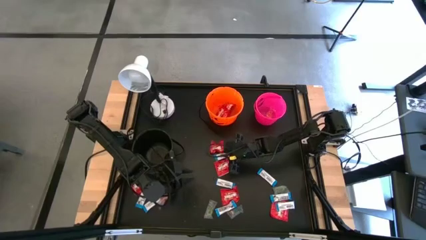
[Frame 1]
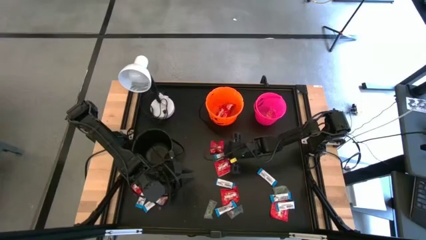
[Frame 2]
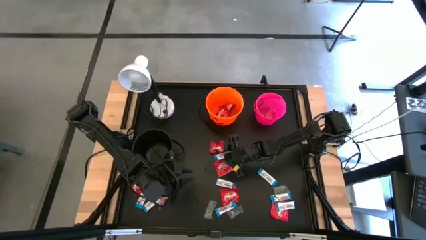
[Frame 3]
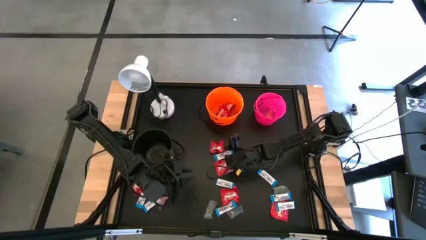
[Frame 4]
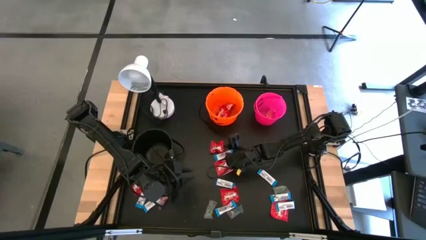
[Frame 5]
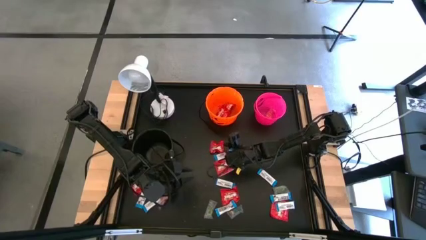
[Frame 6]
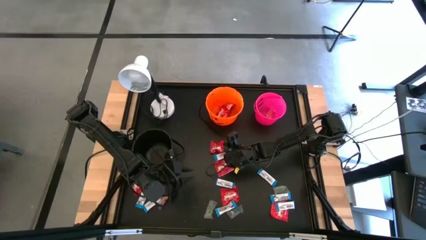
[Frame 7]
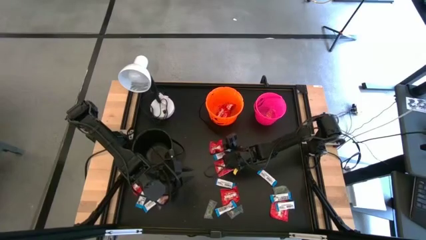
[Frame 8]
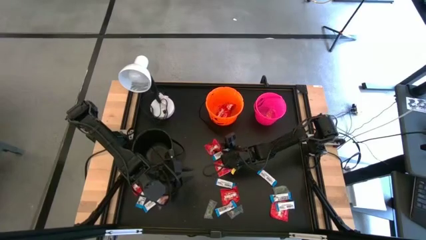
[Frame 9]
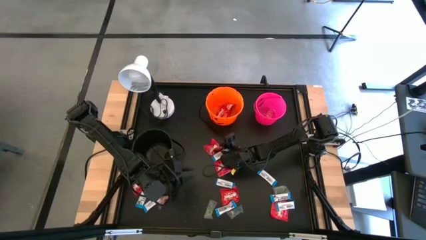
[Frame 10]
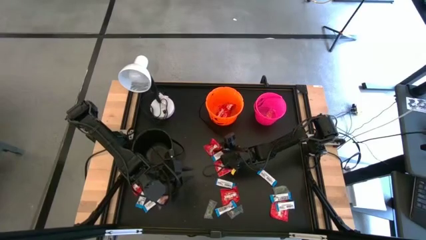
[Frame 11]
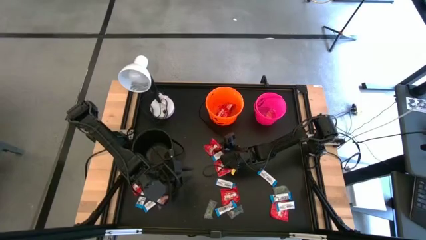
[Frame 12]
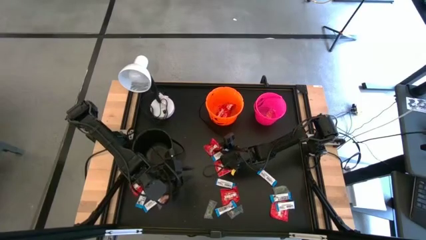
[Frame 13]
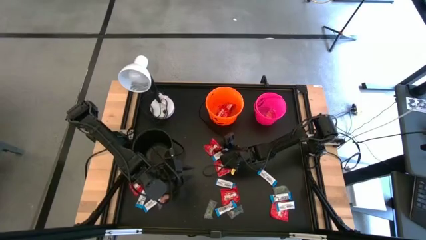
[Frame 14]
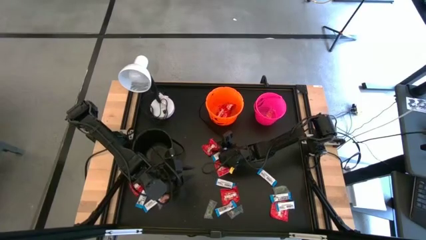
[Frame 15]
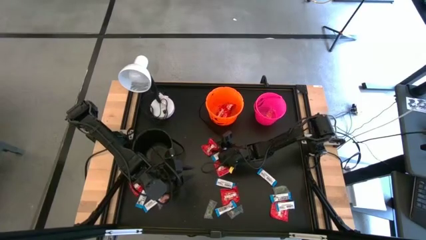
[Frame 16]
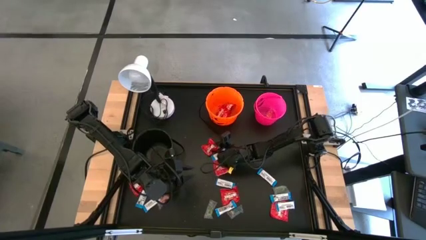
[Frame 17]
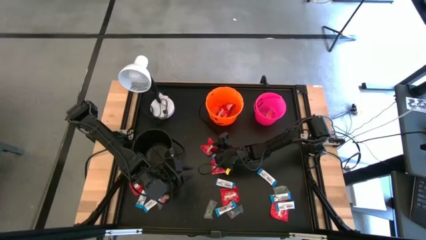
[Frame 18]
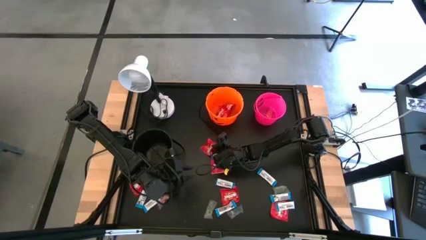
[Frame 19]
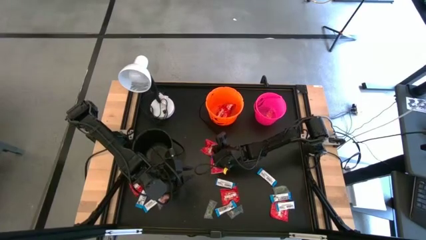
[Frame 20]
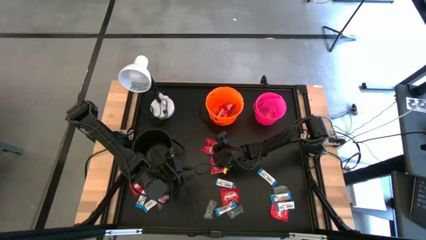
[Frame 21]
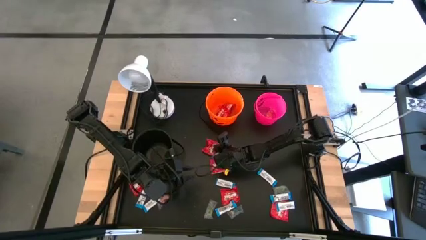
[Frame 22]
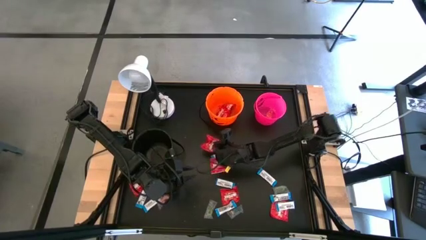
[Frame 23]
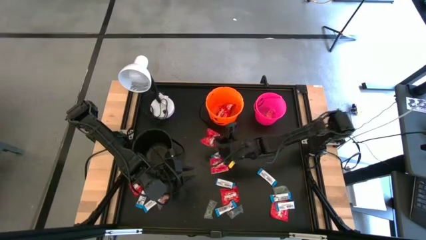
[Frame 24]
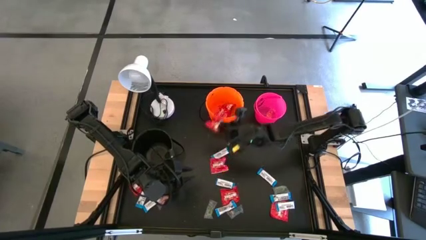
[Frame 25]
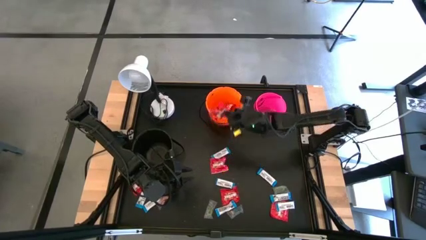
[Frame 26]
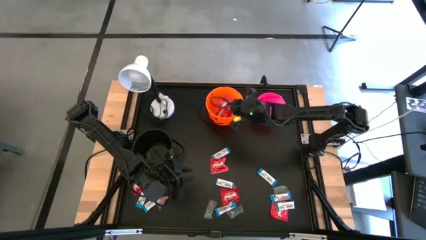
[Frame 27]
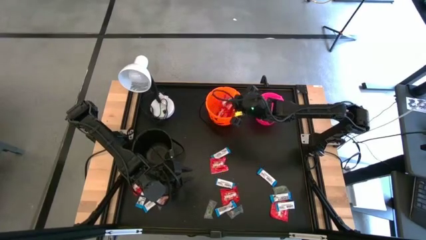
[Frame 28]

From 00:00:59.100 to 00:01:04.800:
Task: Sort candy
Put the red candy into the orange bucket

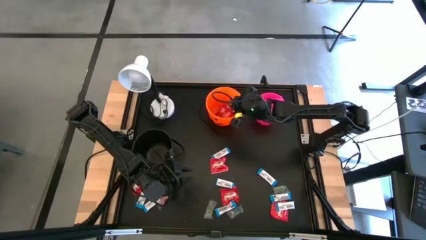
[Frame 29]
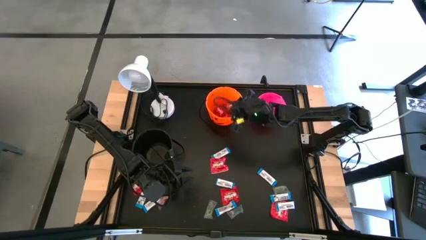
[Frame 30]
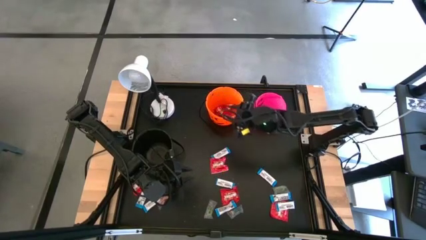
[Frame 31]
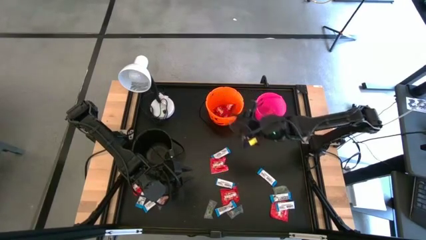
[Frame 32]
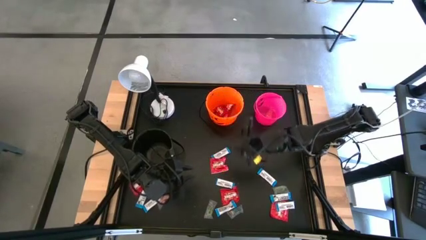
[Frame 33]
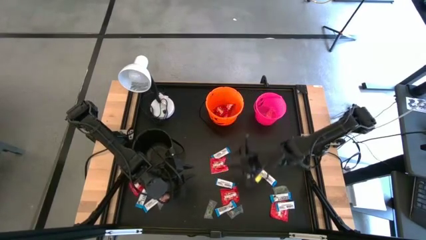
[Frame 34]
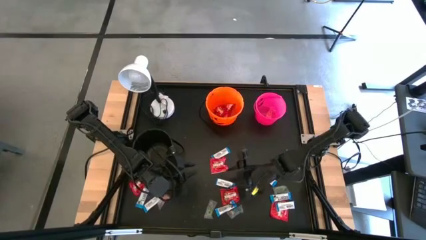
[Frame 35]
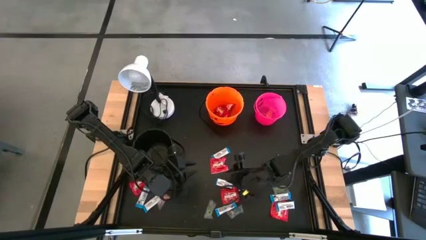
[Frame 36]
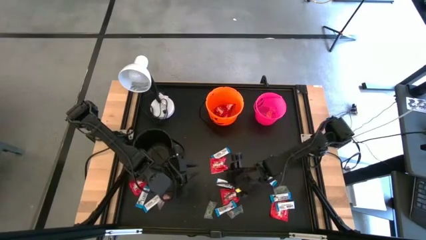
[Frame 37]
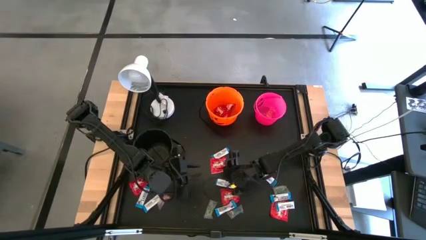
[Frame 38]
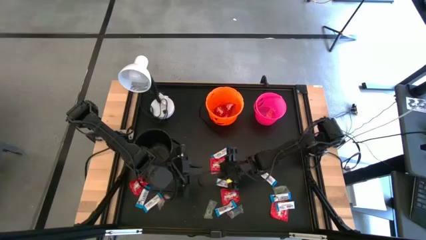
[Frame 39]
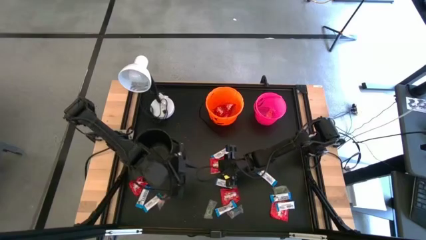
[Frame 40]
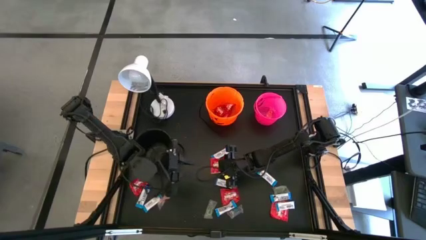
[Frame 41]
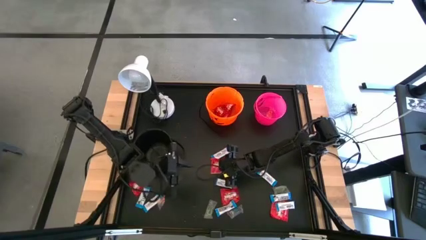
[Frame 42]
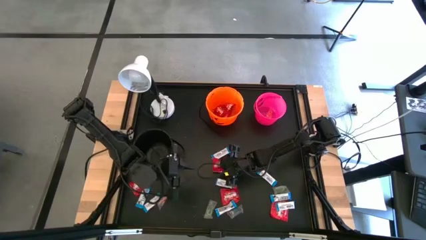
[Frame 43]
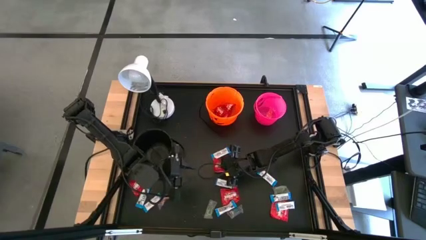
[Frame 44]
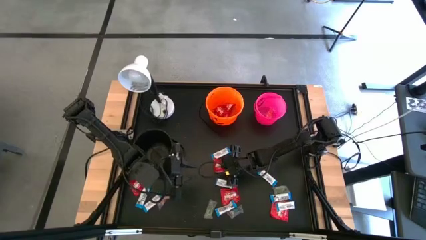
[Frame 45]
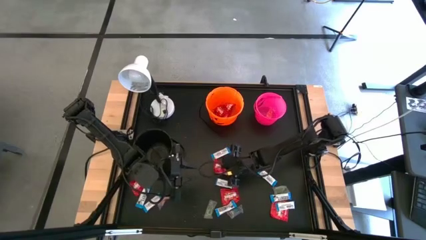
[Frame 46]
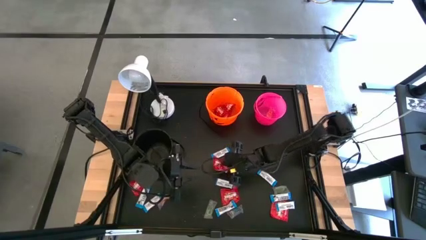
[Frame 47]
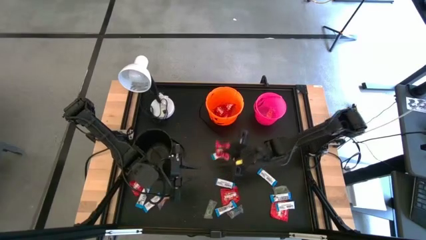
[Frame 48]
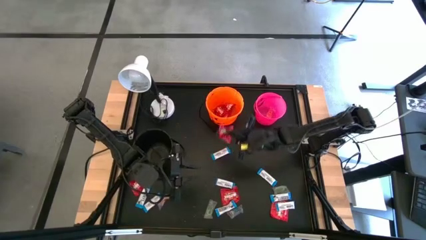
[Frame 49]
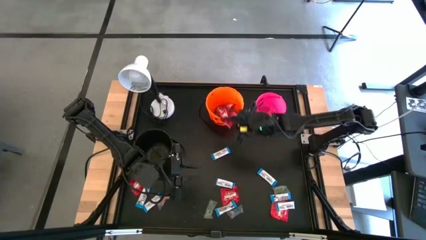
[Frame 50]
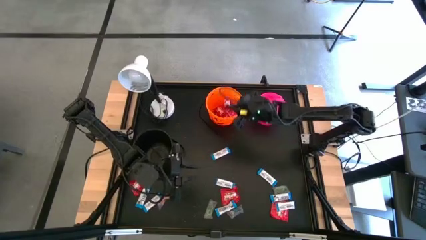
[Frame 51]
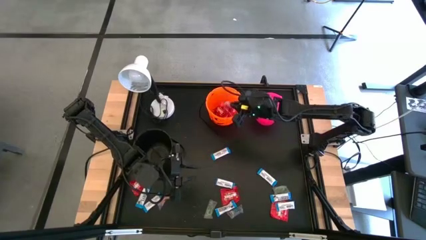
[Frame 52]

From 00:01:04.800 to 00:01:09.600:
Put the red candy into the orange bucket

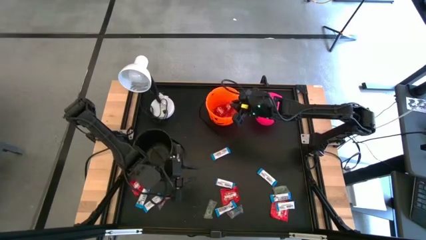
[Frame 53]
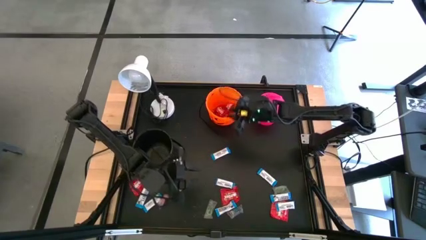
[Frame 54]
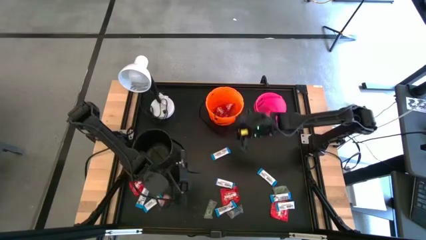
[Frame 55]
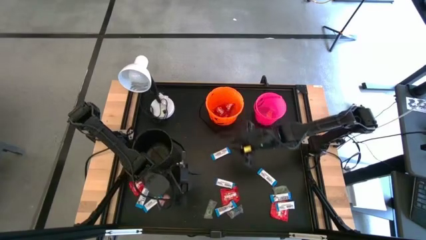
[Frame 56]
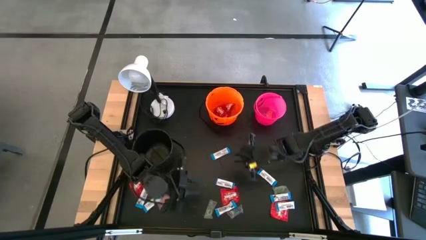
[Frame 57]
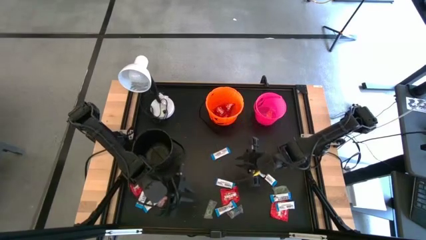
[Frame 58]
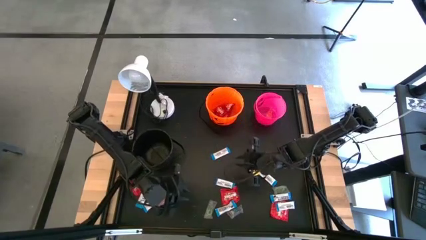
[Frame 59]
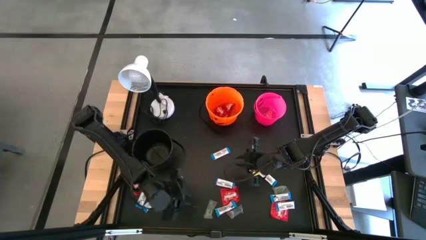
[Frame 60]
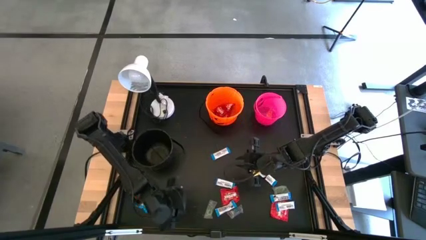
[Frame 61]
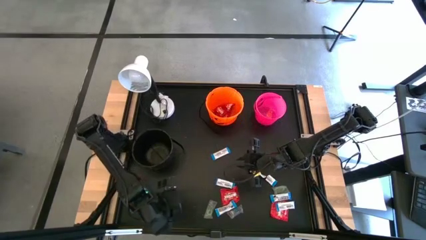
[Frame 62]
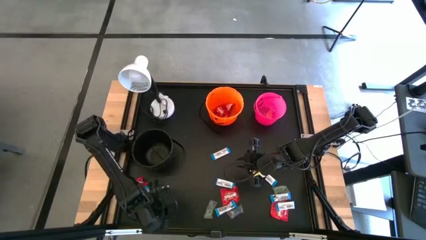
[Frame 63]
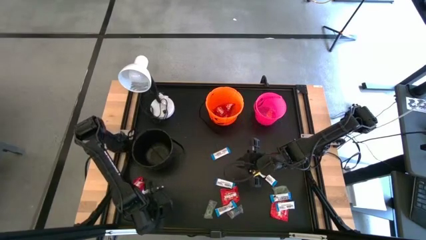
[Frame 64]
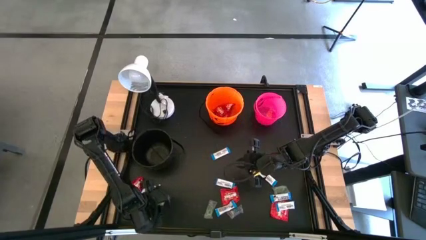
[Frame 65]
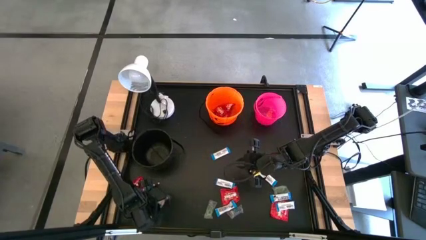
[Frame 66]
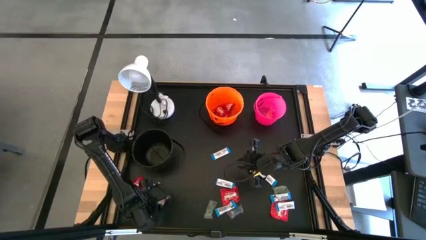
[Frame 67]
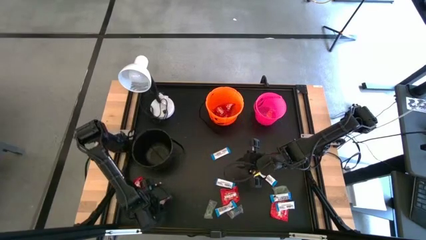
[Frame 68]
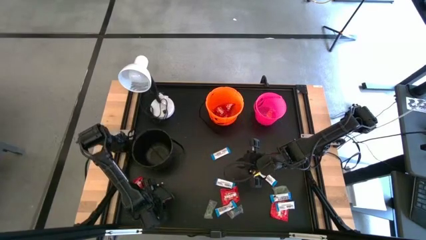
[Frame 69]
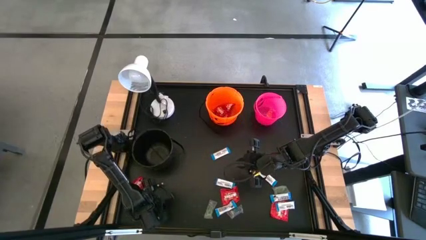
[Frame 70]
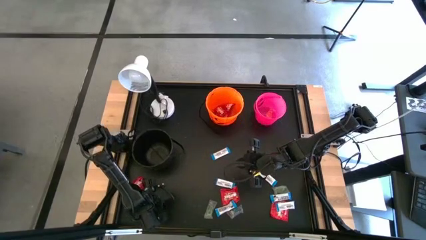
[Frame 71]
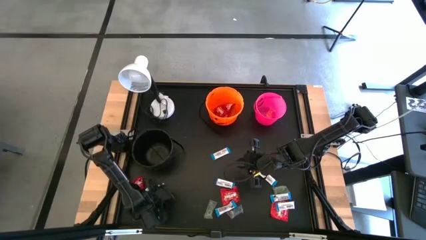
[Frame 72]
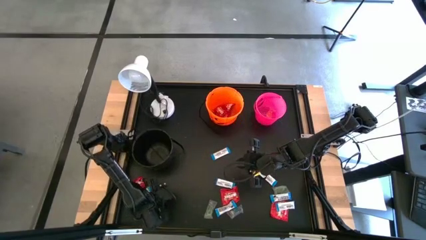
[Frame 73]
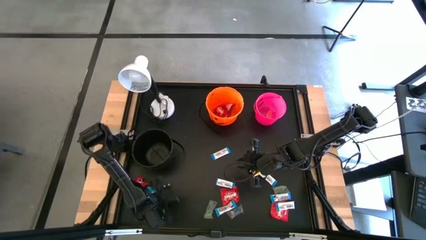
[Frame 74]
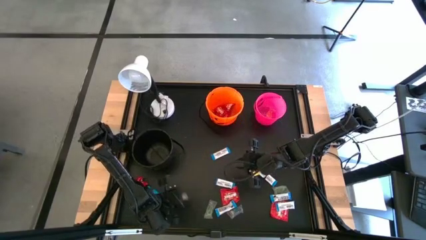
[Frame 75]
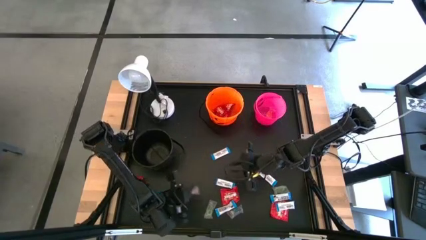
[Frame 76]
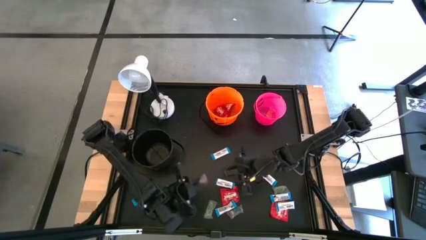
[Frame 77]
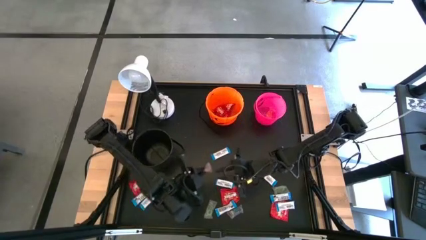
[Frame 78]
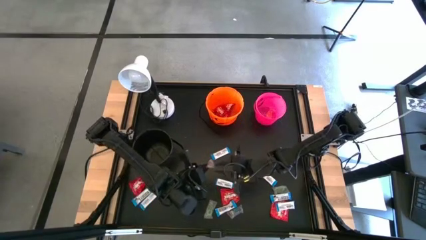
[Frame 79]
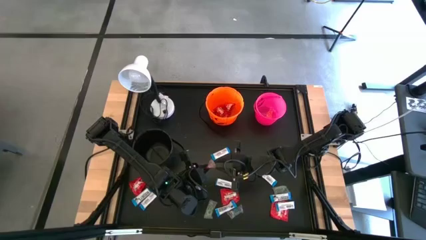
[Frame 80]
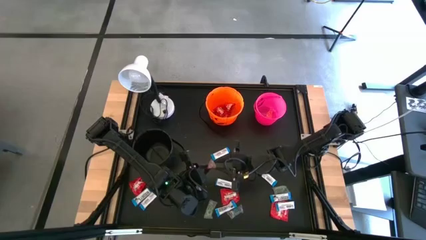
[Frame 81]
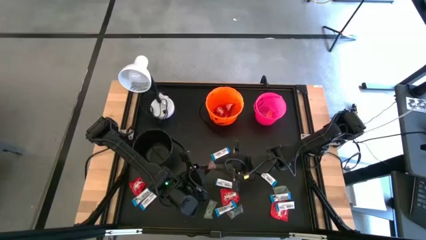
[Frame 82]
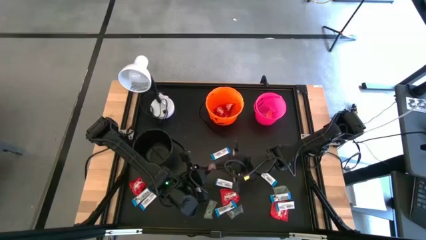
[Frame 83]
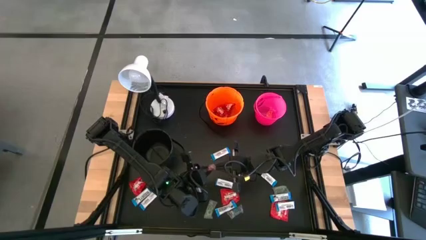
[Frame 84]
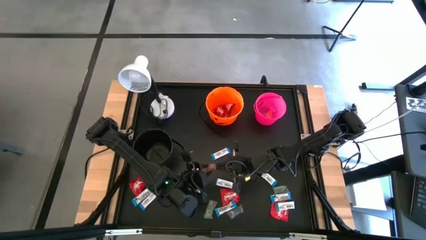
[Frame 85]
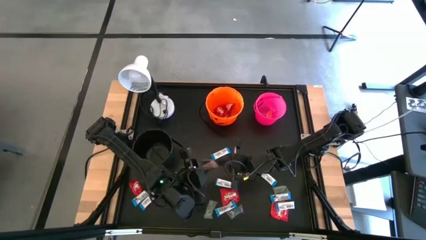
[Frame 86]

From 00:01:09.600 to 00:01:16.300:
Put the orange candy into the pink bucket
